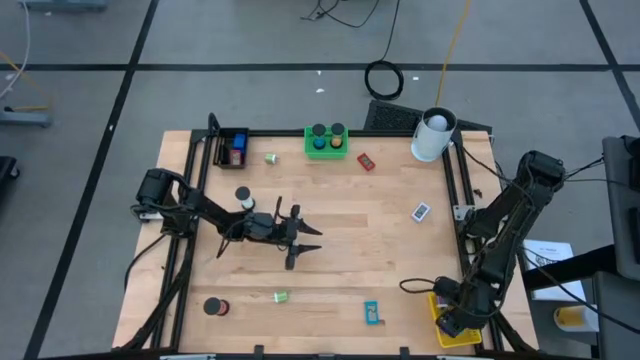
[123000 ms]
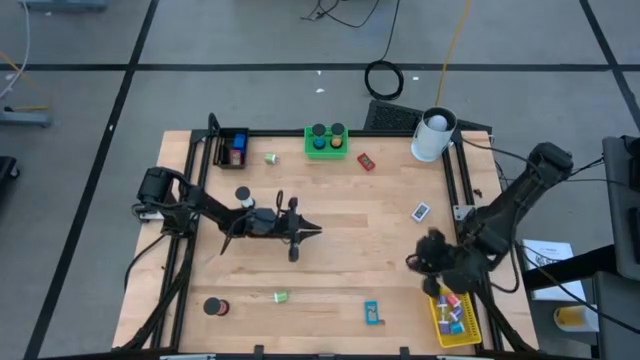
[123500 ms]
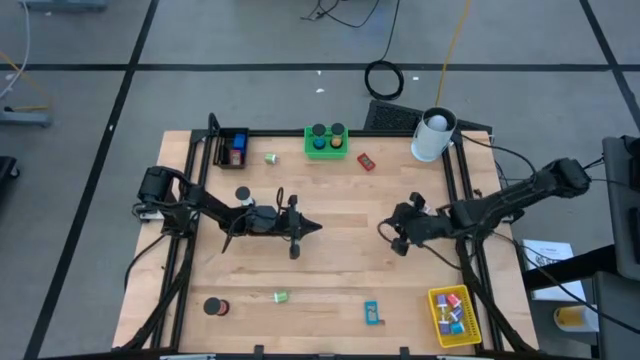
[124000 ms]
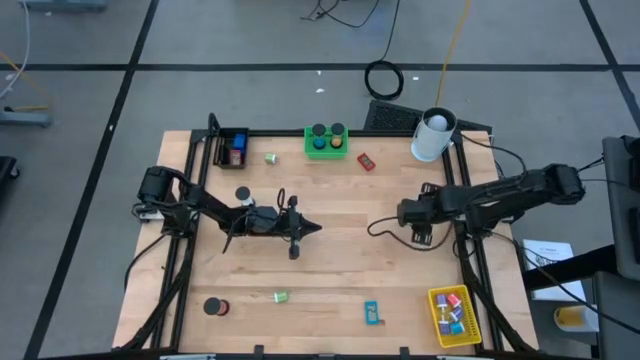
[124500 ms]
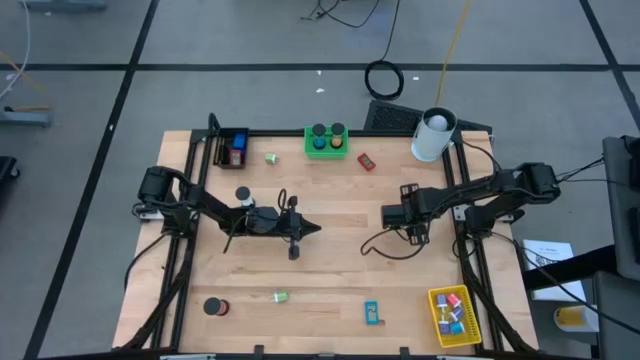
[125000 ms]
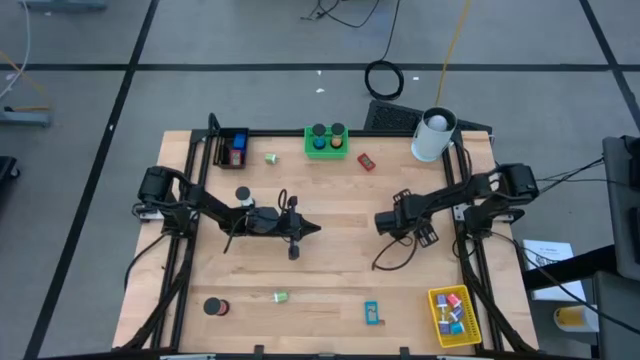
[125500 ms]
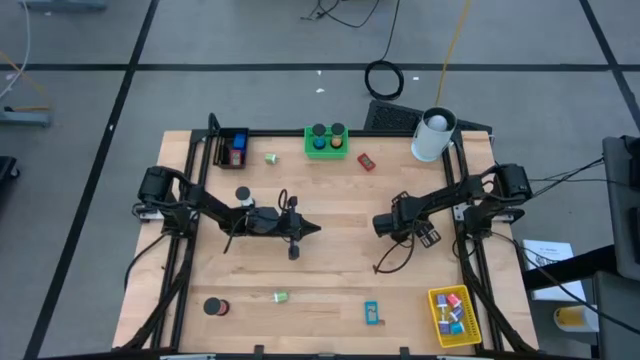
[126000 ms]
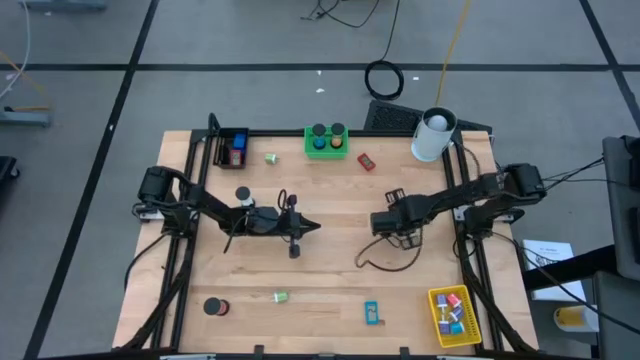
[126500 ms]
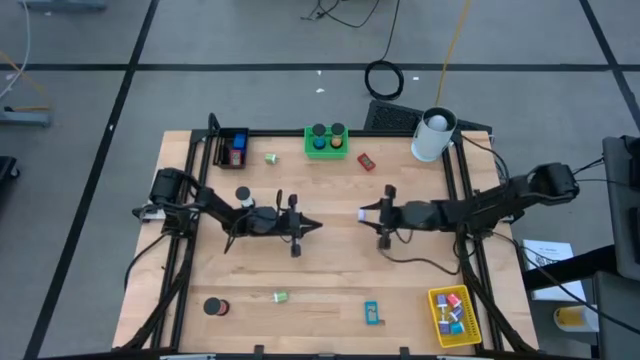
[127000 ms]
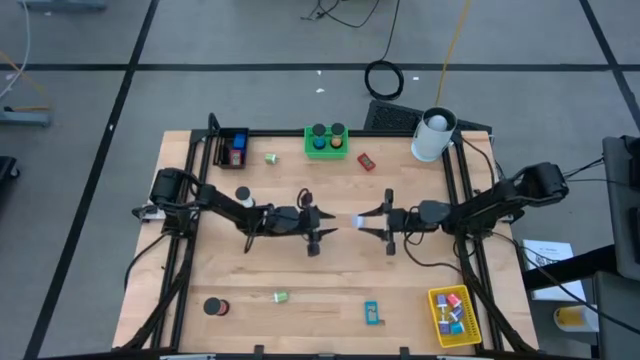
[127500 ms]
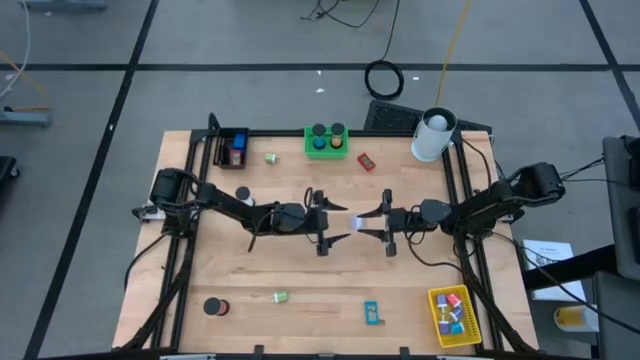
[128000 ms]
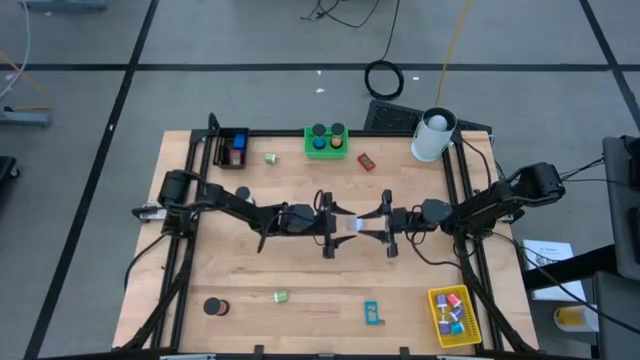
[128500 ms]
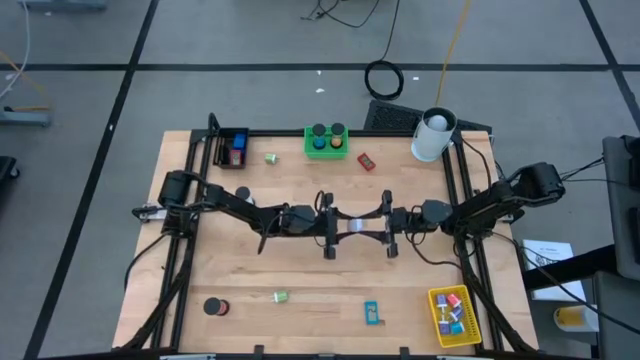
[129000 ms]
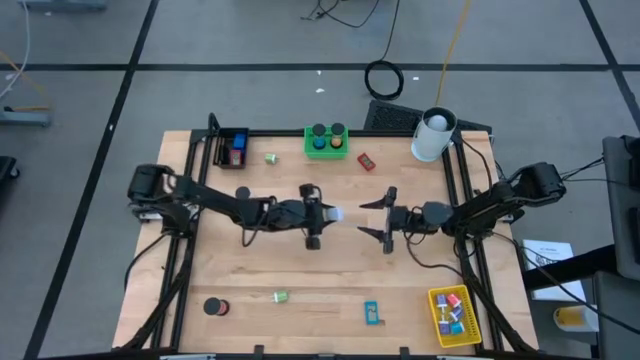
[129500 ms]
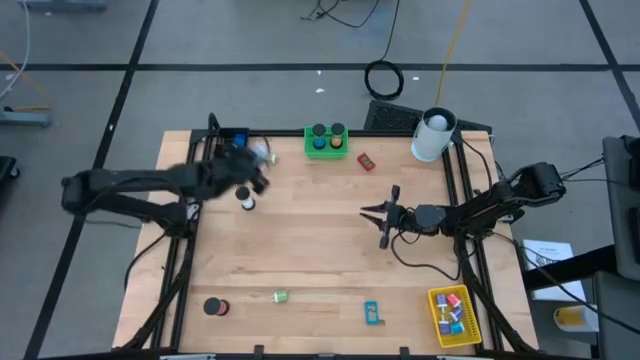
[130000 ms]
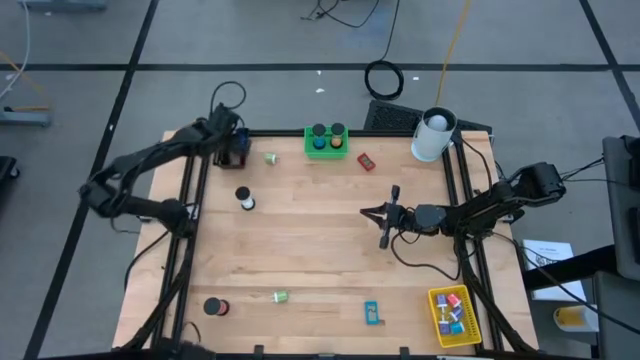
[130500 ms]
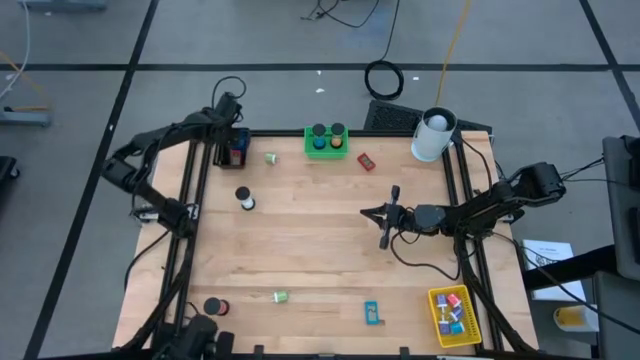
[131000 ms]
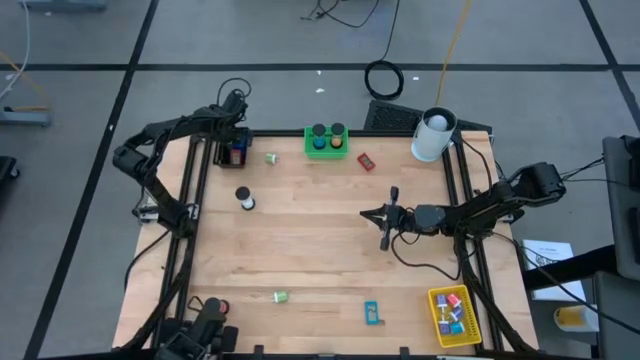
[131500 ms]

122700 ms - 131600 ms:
Task: Pick & Place Office items
Put the white digital clock into the black basket

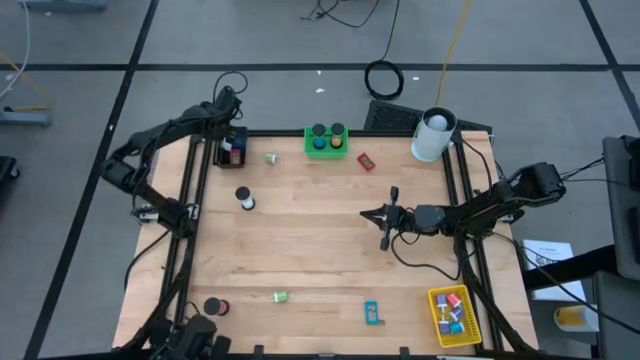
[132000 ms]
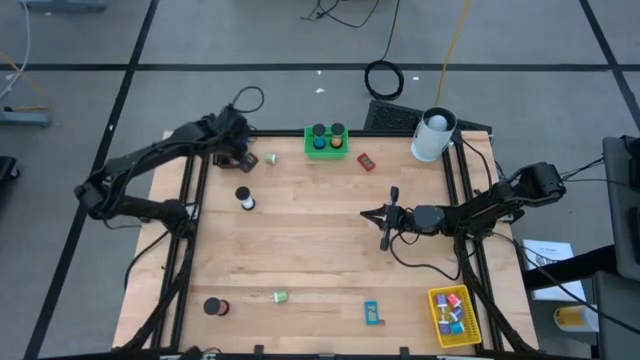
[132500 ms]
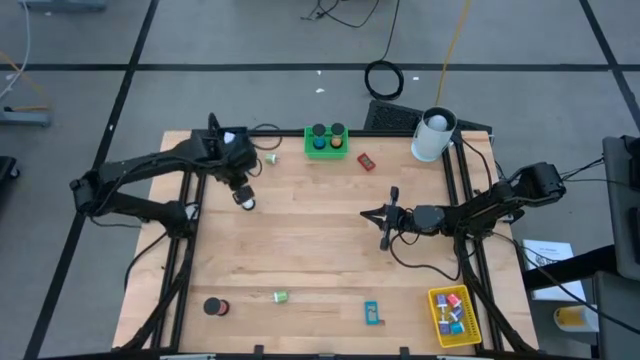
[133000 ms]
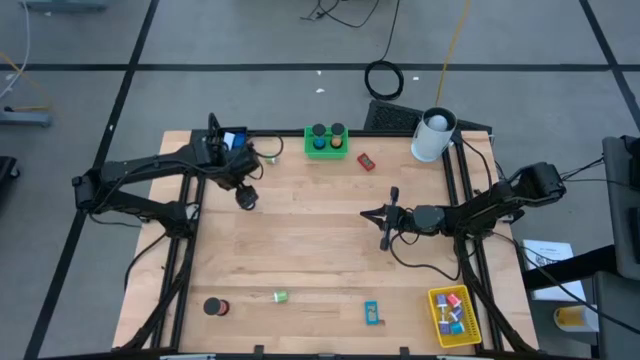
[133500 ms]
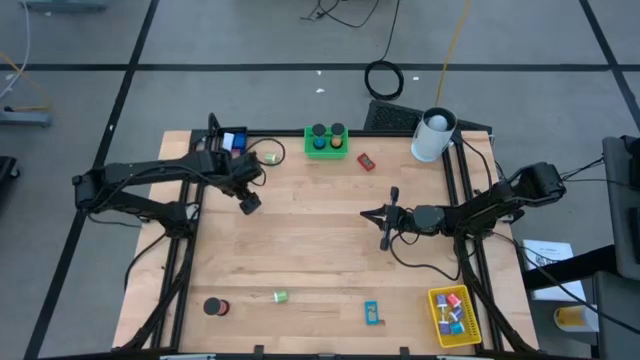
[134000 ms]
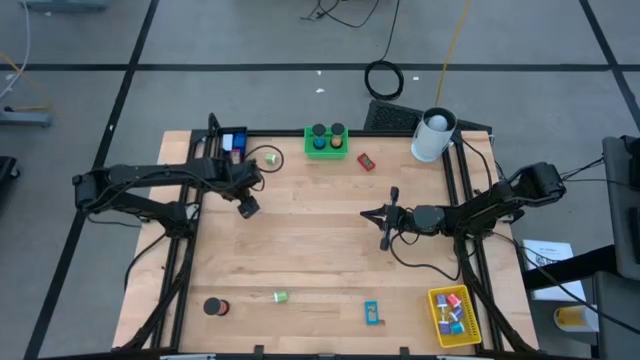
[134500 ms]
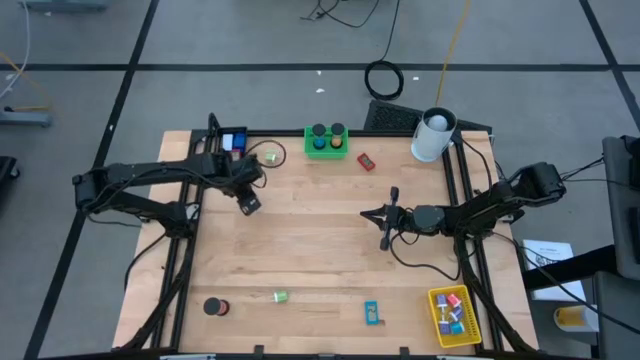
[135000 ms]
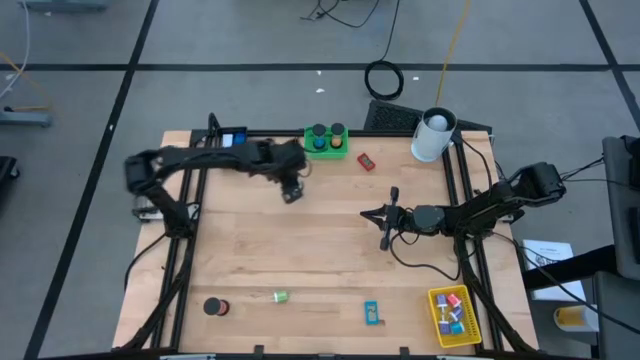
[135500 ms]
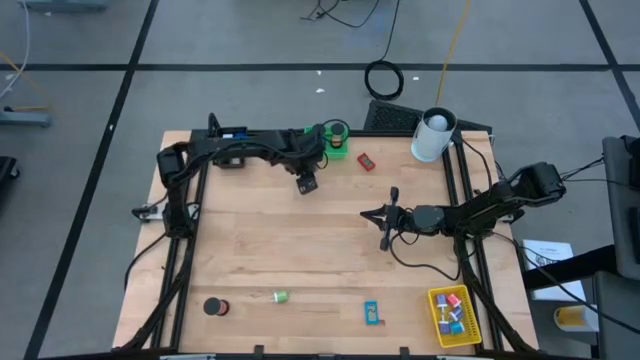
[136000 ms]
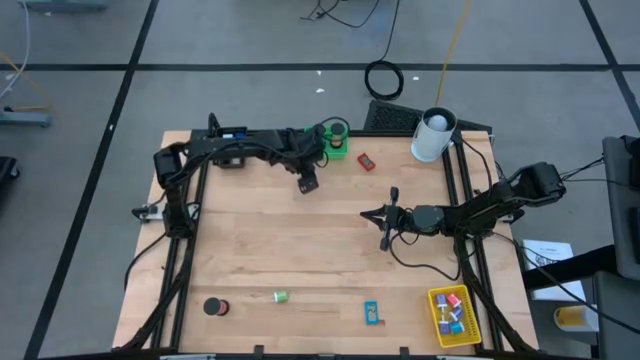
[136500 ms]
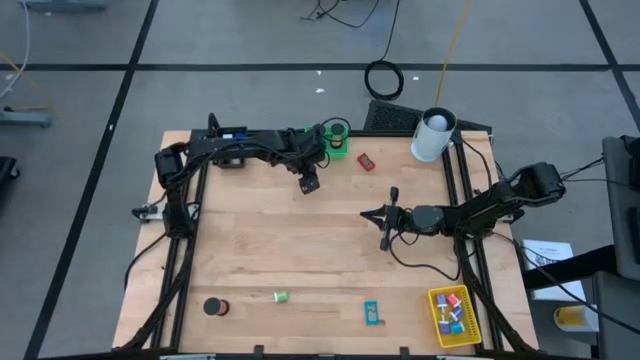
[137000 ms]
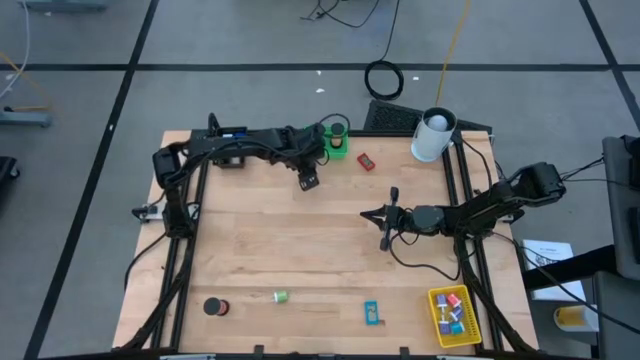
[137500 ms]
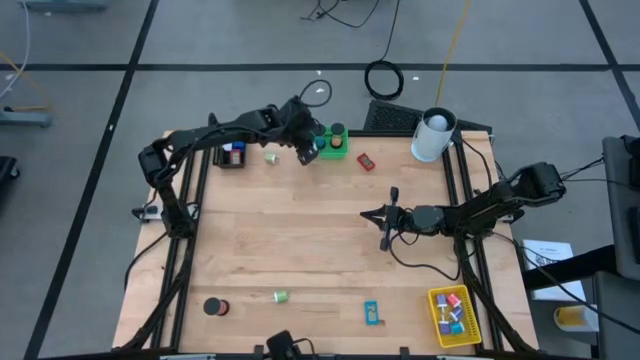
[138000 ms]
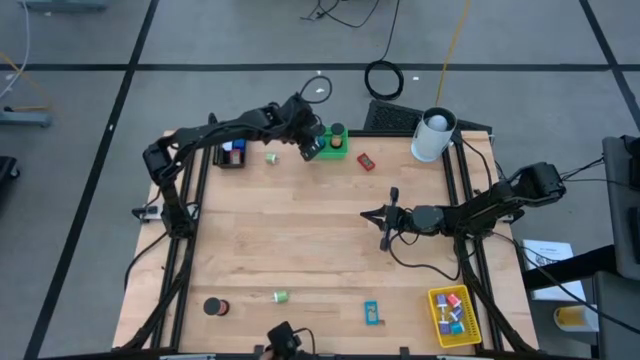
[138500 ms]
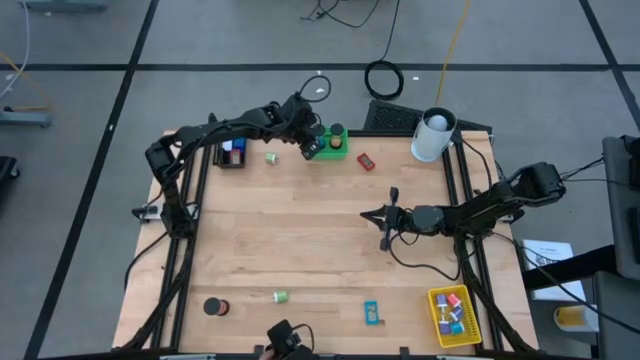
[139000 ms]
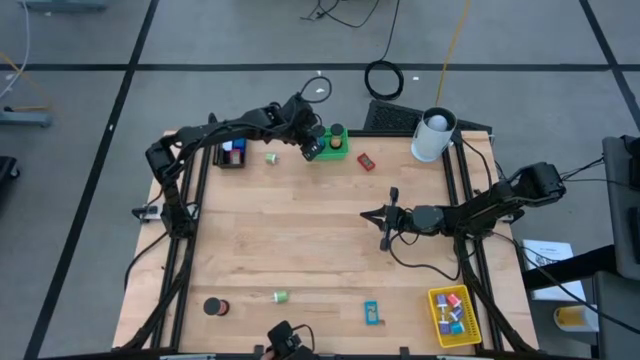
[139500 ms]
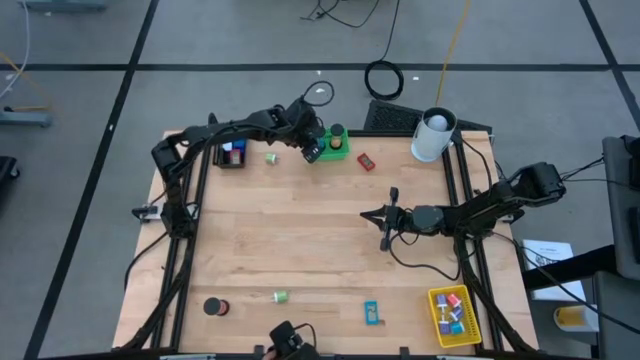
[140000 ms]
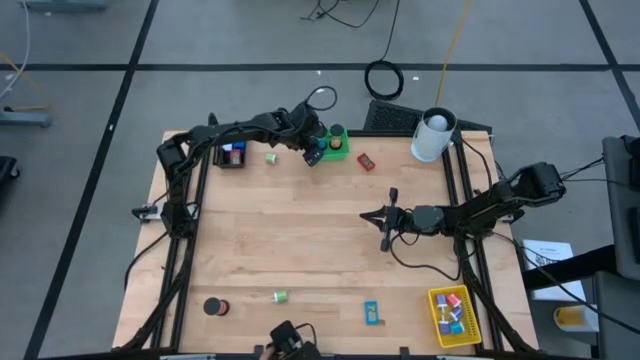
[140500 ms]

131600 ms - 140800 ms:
Put the white hourglass into the green basket

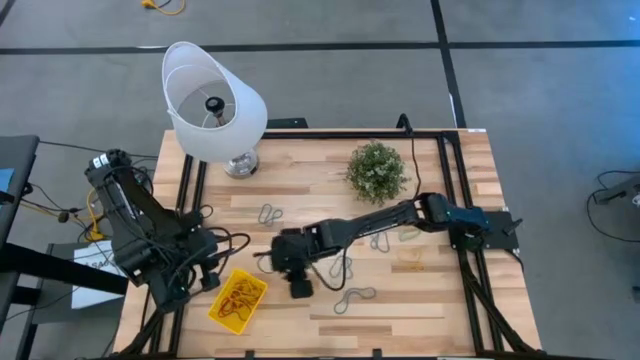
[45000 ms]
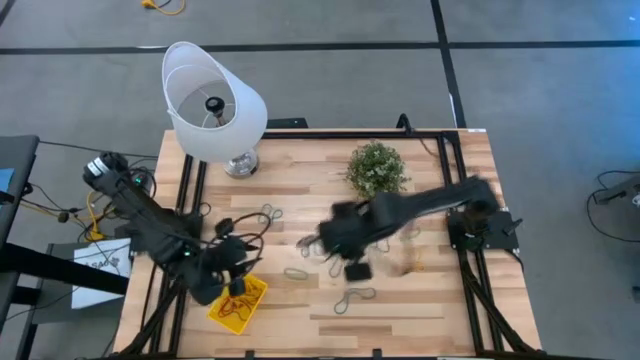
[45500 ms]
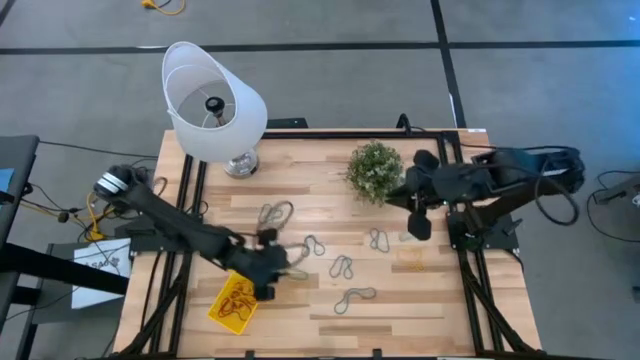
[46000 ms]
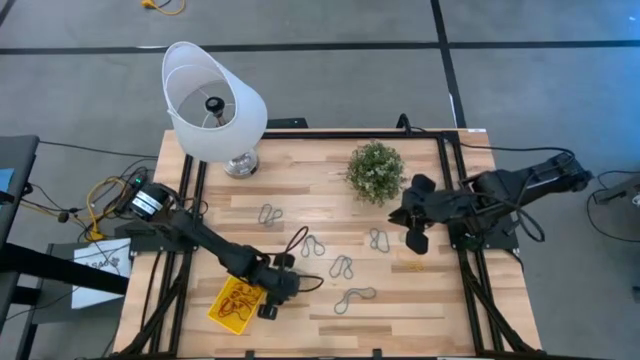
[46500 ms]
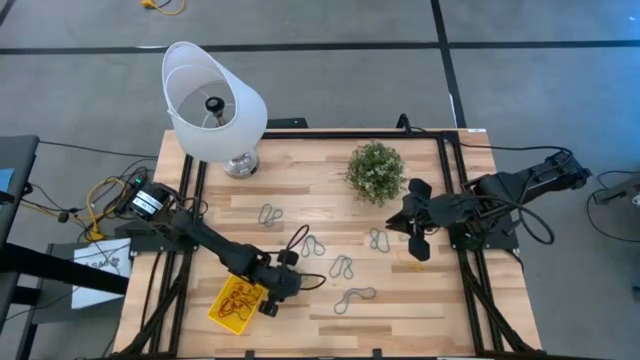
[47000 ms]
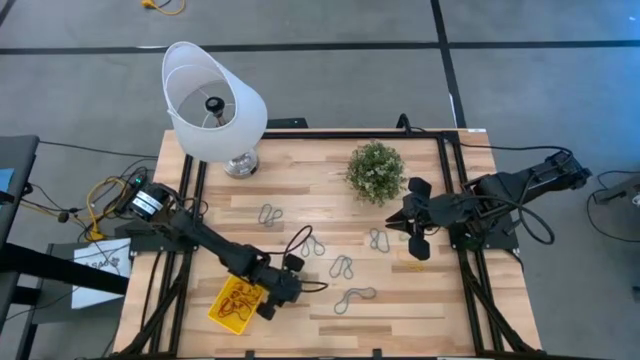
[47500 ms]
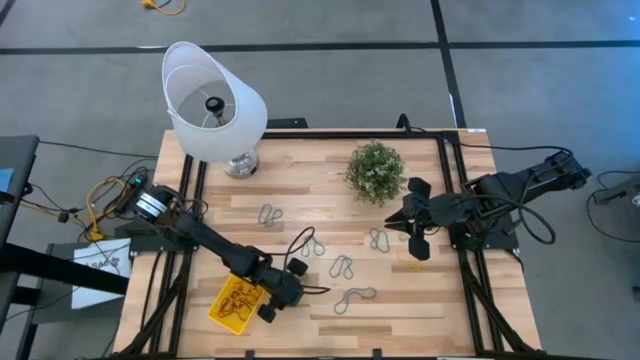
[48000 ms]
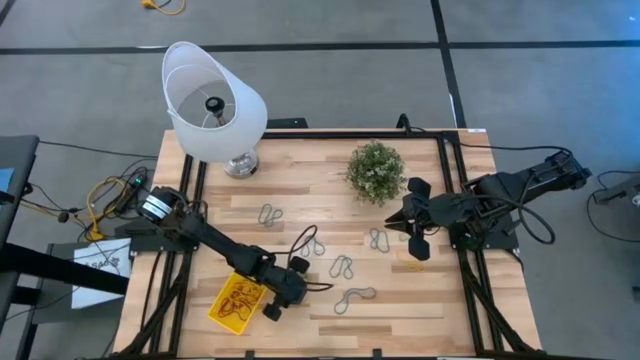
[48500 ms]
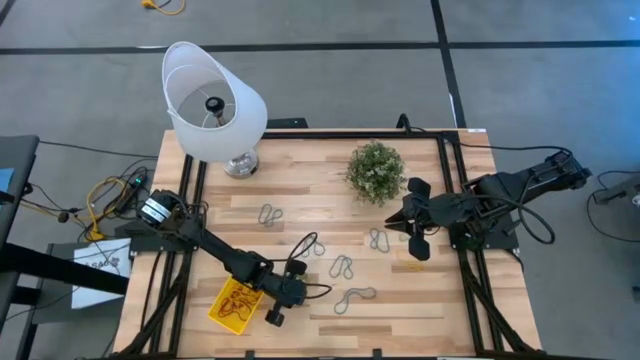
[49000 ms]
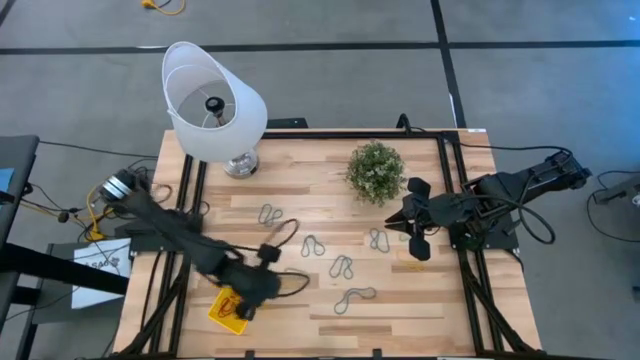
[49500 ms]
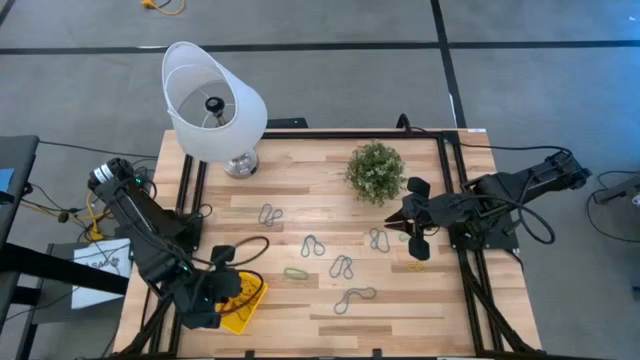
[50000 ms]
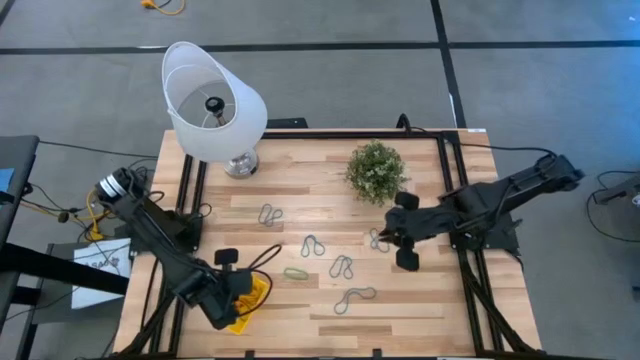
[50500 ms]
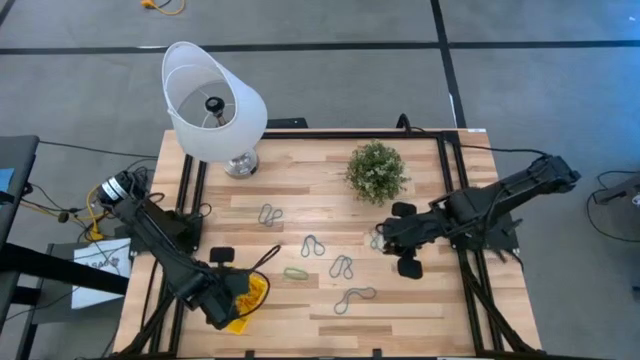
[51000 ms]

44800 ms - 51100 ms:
Task: Pick and place items into bin
Put the left yellow rubberband into the yellow bin
